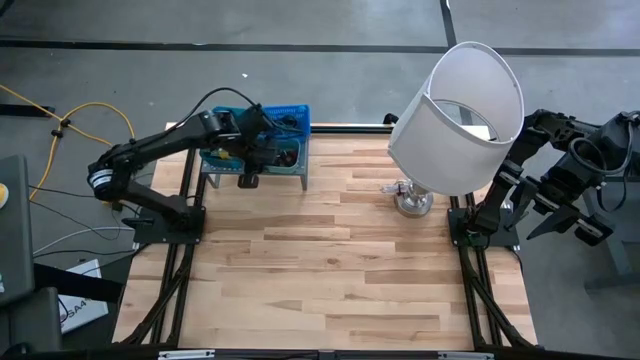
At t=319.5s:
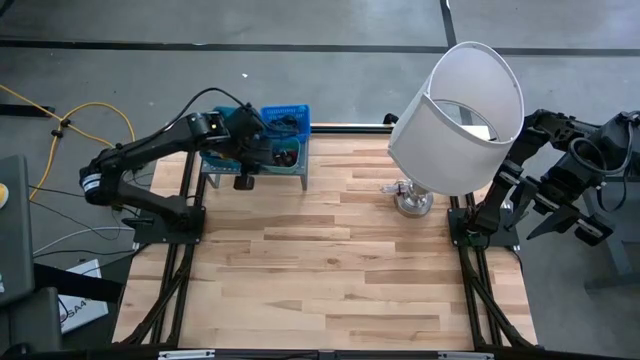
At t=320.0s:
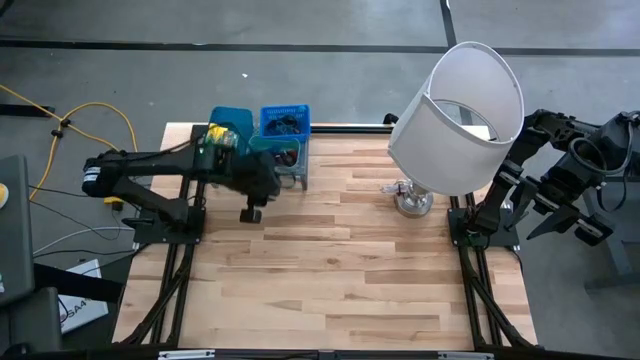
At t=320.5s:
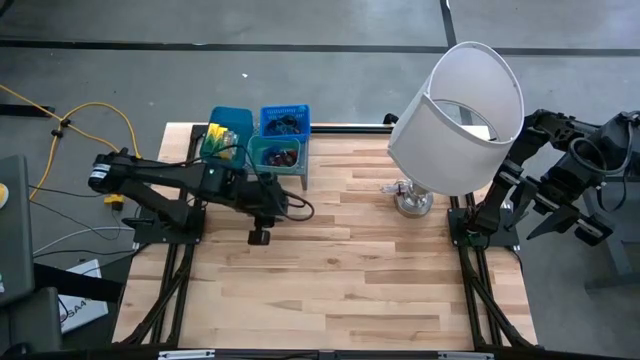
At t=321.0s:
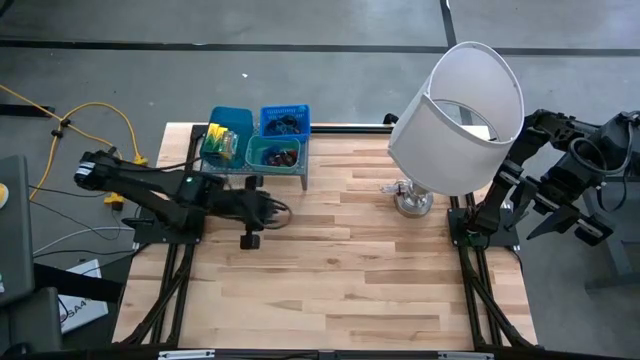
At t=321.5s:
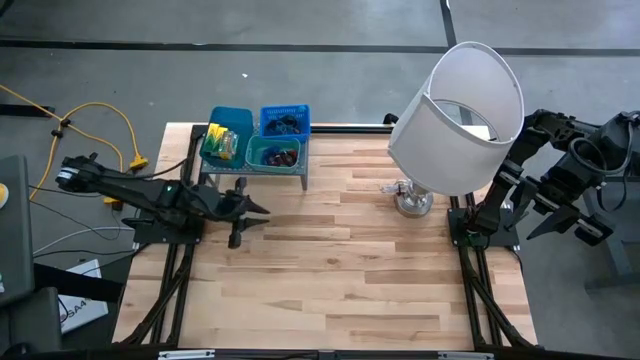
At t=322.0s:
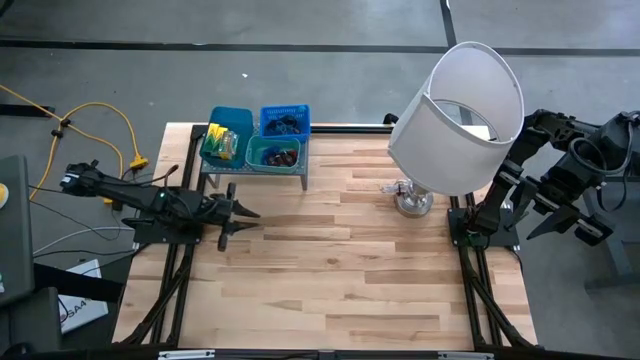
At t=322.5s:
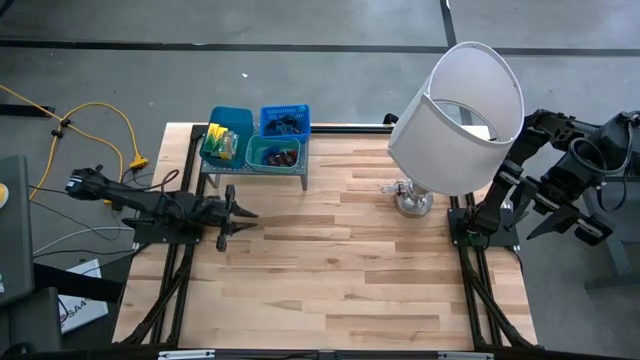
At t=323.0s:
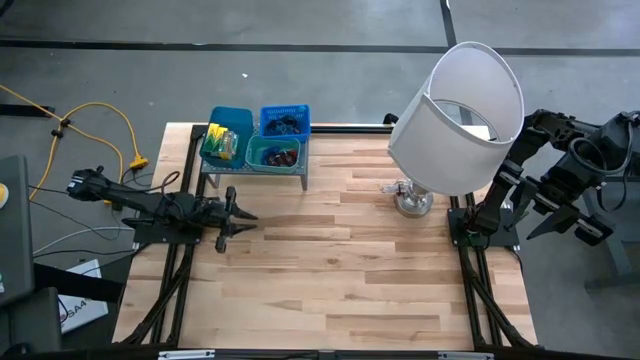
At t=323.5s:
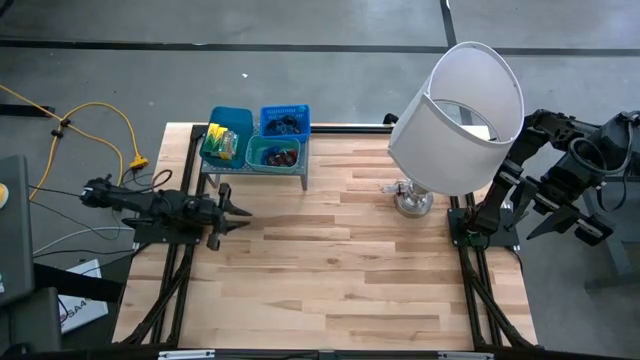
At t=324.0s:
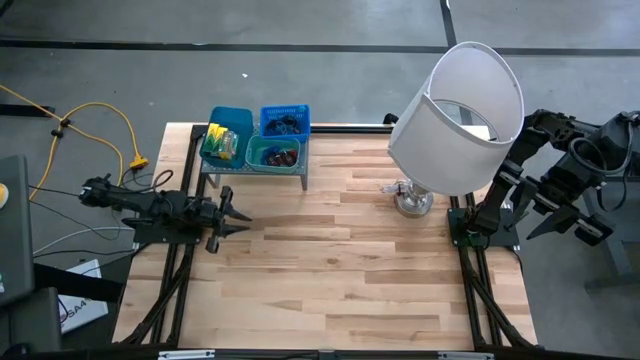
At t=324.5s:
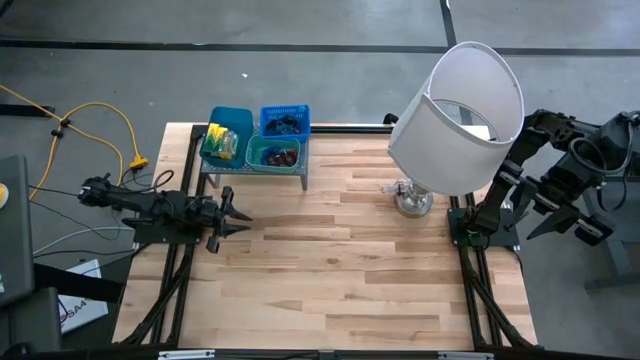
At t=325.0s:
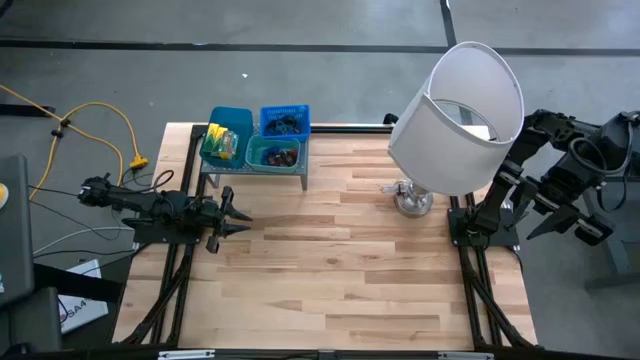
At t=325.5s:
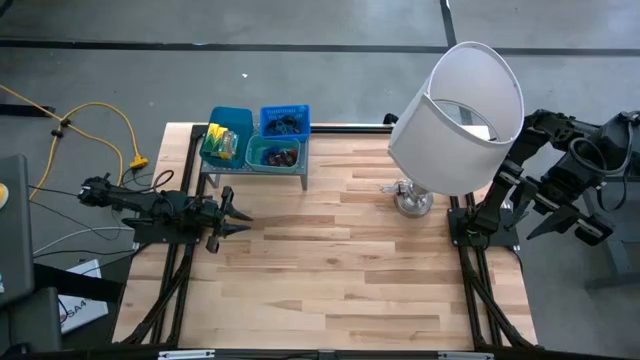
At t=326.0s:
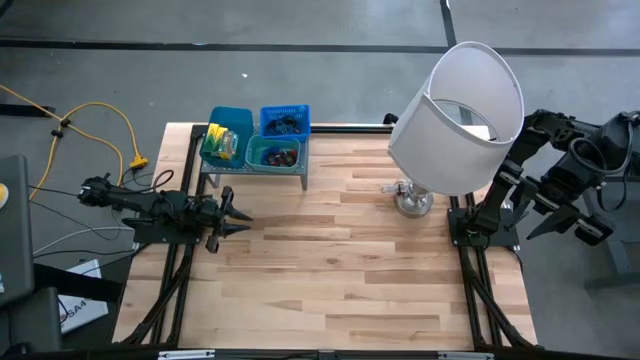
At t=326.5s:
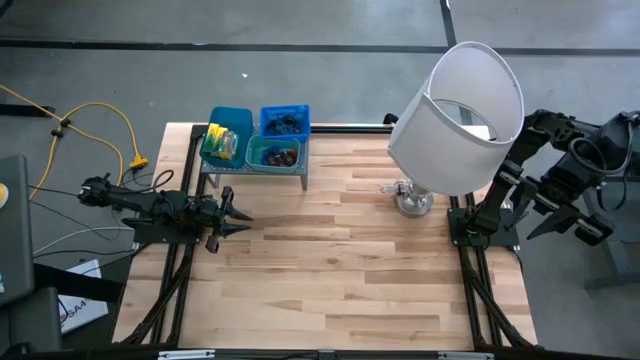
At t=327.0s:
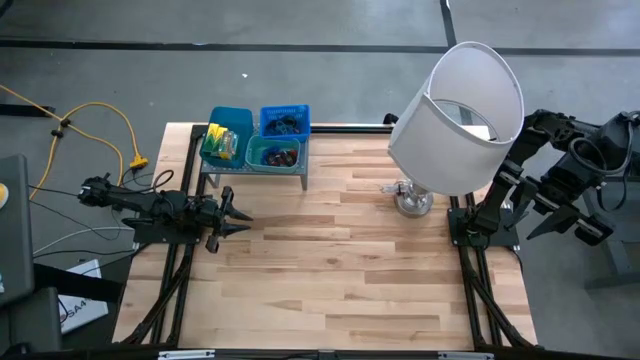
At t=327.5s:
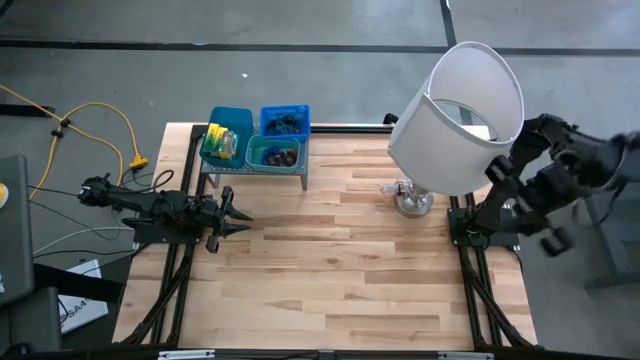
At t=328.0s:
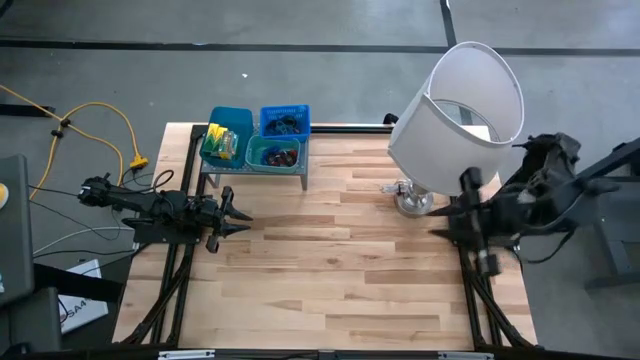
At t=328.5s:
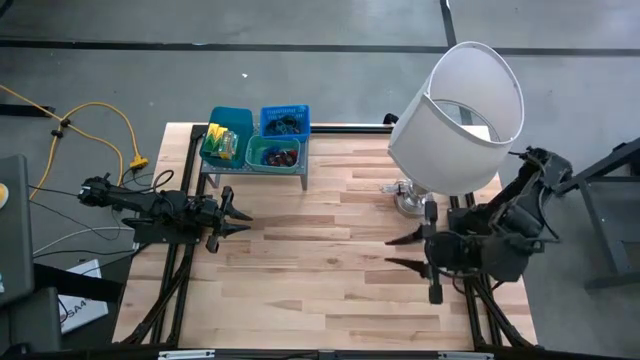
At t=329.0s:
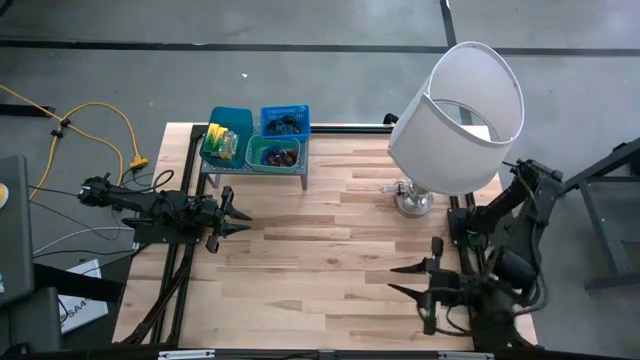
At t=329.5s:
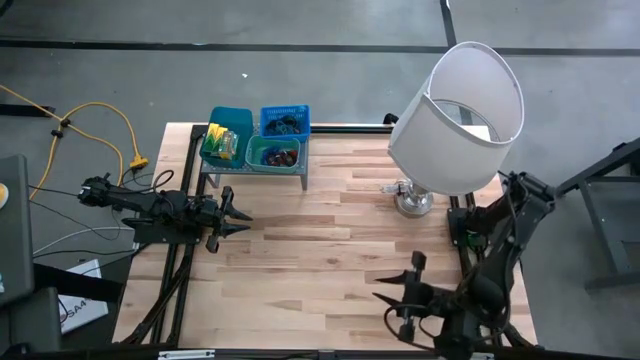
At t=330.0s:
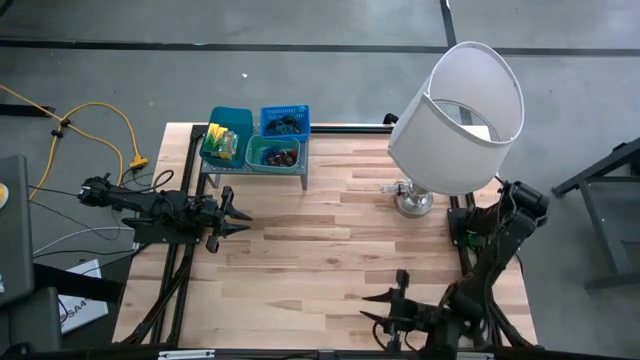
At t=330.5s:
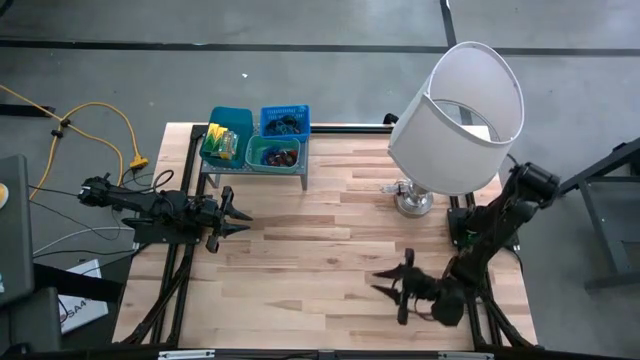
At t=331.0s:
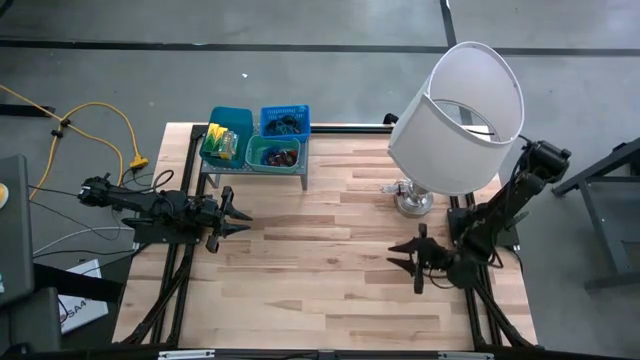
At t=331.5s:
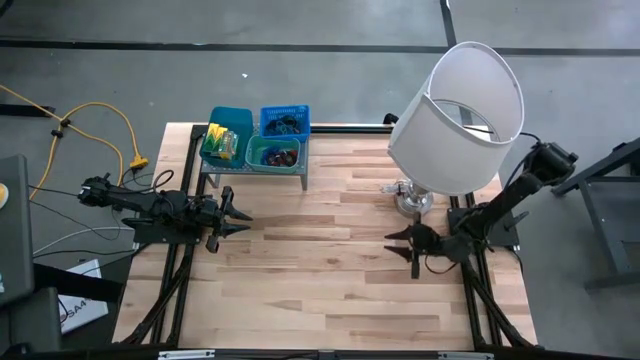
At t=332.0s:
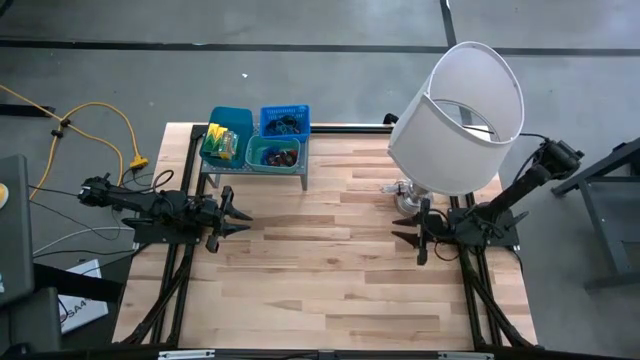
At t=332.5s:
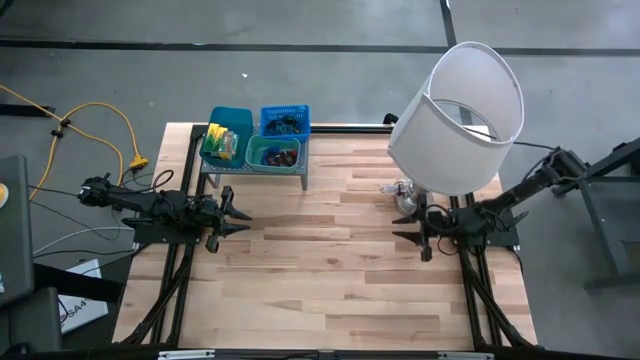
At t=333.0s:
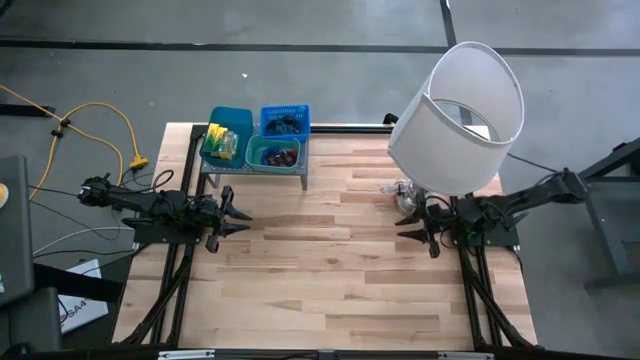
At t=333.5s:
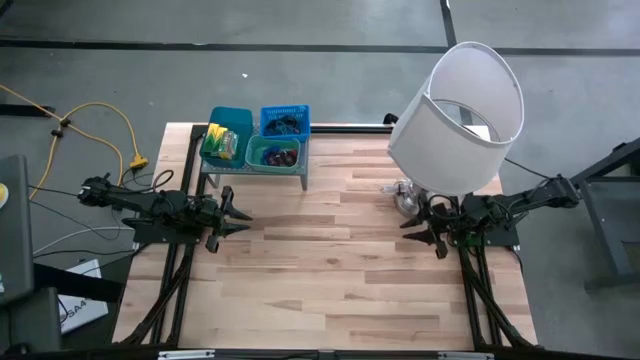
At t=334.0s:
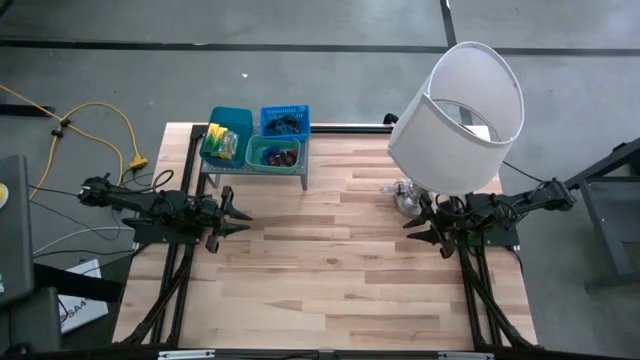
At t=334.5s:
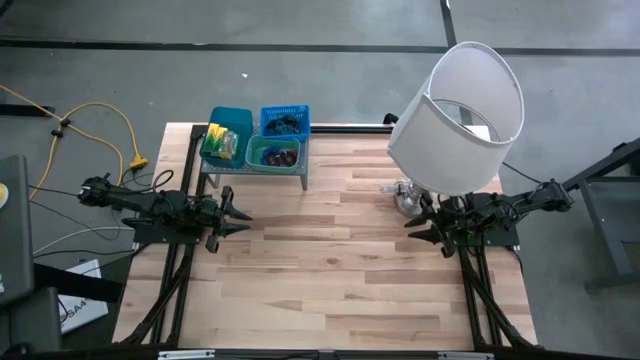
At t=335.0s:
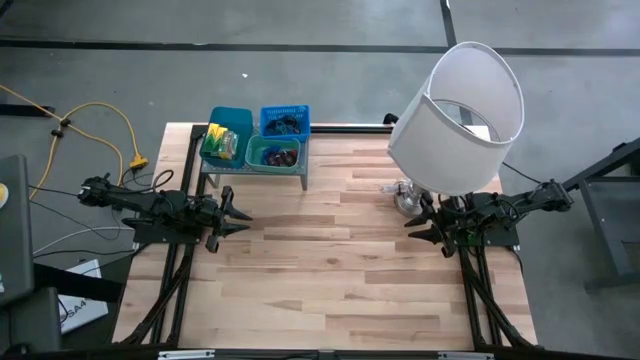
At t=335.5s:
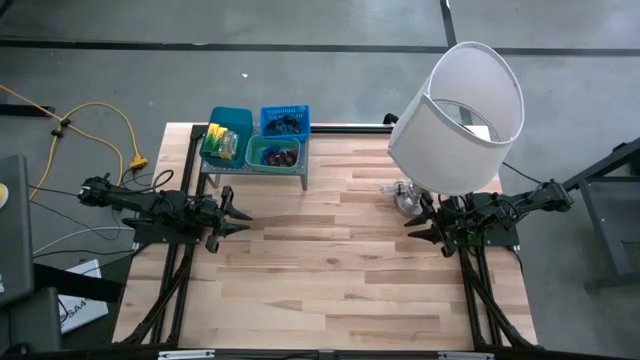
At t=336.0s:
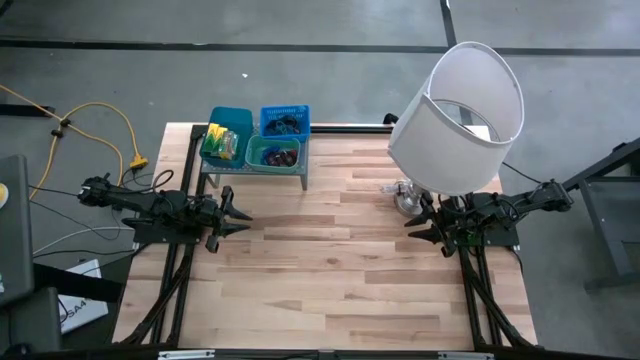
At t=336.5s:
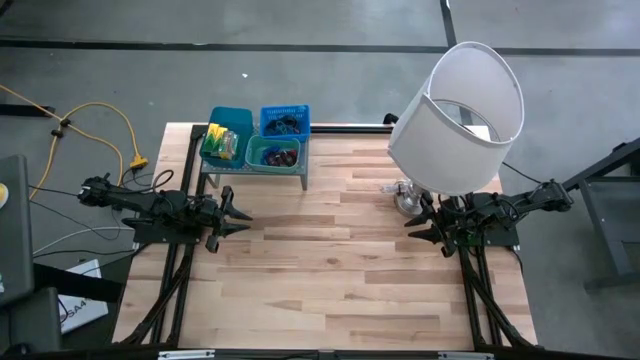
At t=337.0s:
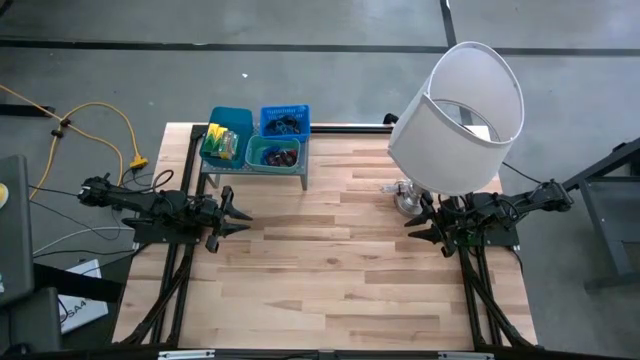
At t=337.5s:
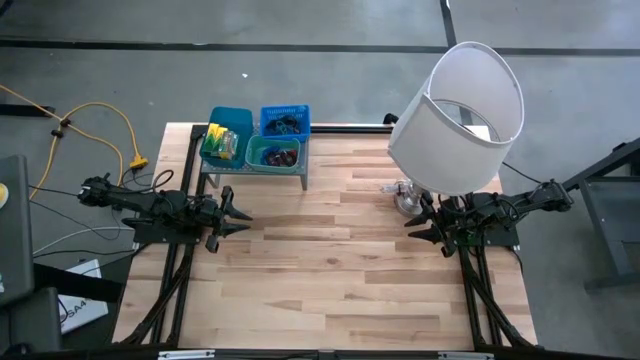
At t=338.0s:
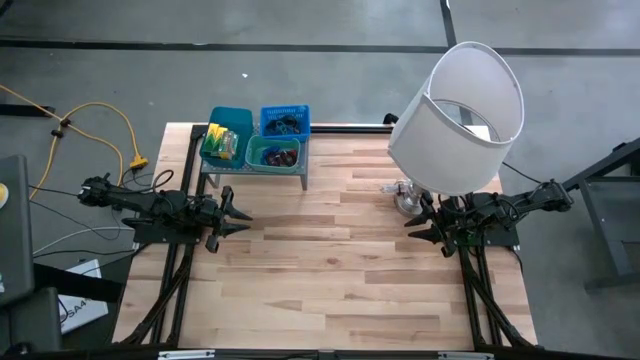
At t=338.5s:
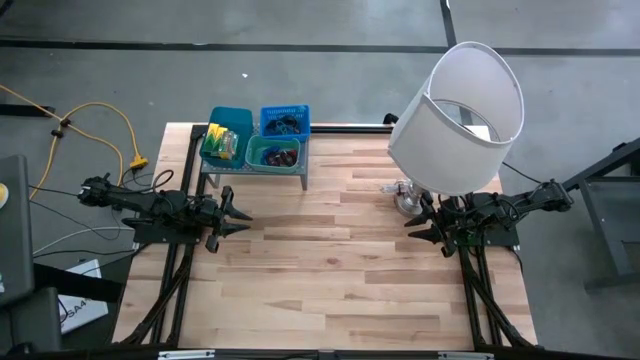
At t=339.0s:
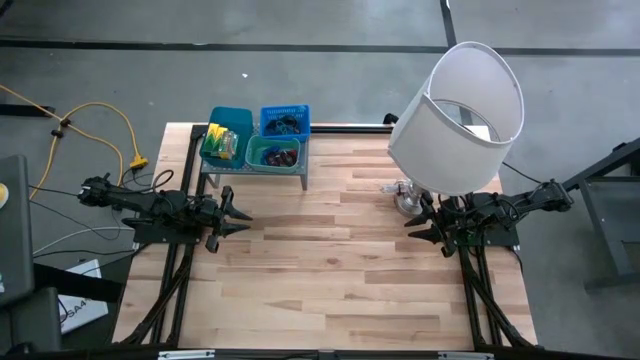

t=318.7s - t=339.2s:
Task: Pick & Place Office Desk Supplies
Return to Home Position

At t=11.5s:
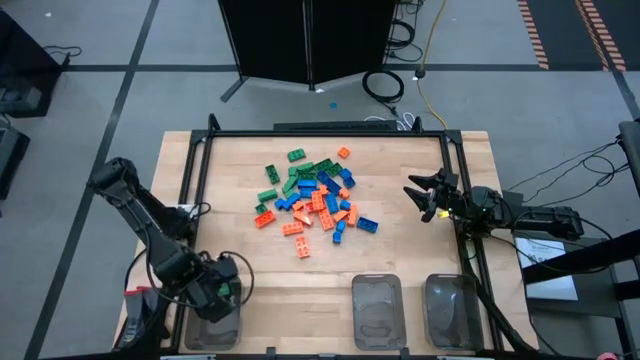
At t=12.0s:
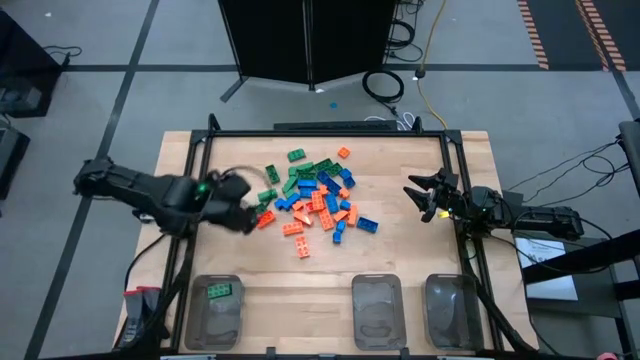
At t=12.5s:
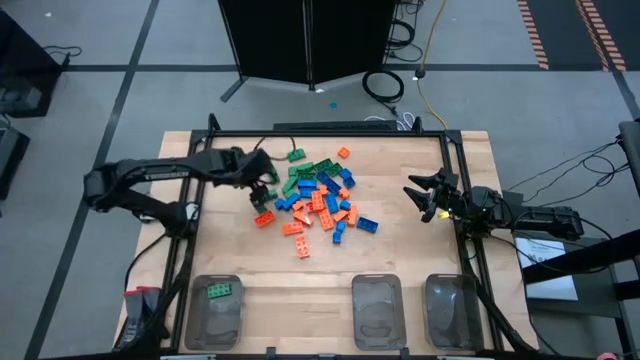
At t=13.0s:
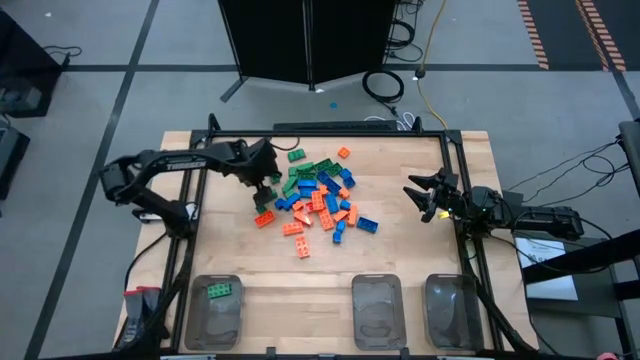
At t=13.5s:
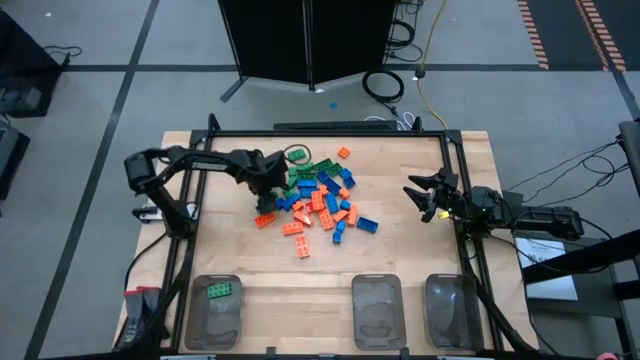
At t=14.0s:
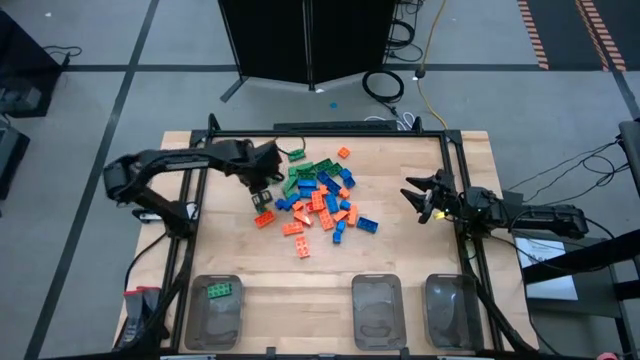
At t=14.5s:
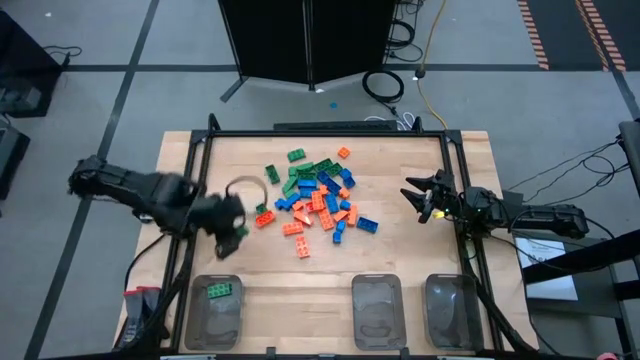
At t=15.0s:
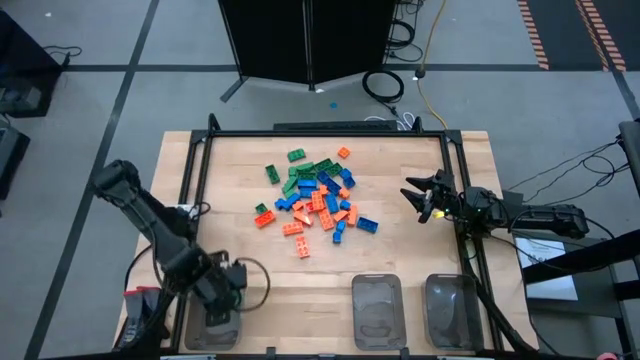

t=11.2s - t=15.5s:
Task: Sort blocks
Put the green game piece into the left black bin
